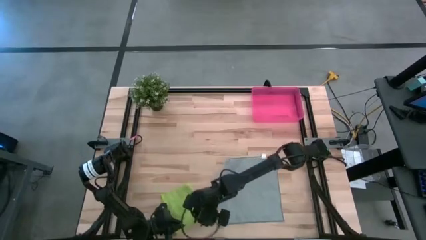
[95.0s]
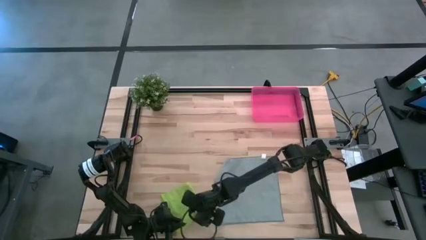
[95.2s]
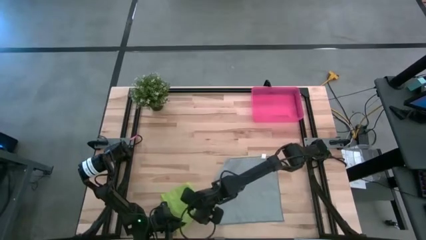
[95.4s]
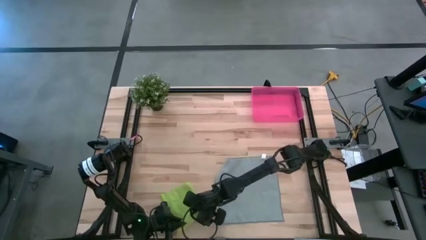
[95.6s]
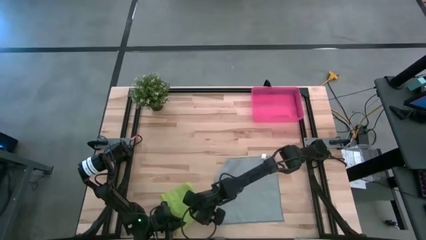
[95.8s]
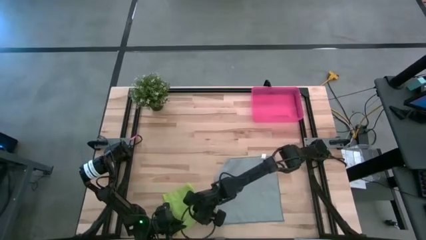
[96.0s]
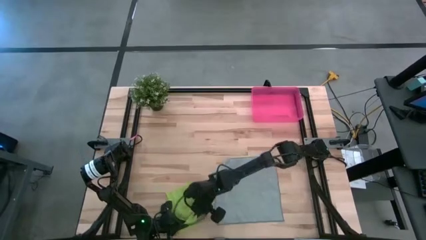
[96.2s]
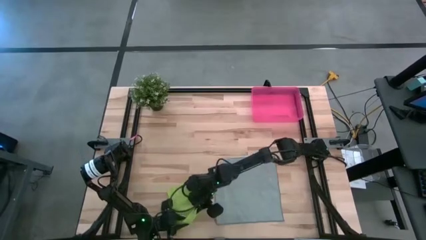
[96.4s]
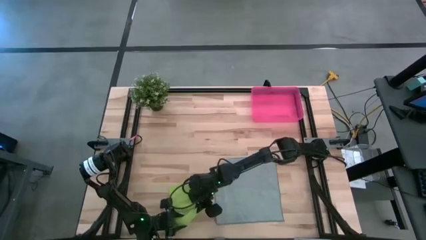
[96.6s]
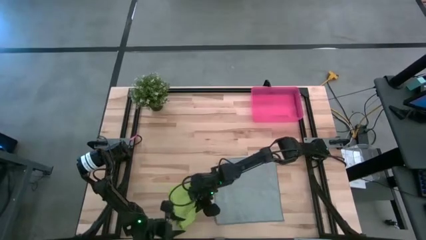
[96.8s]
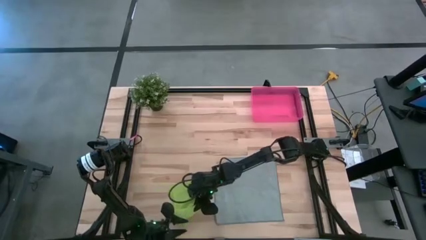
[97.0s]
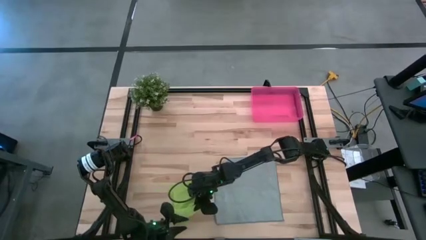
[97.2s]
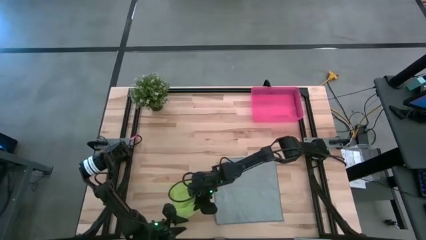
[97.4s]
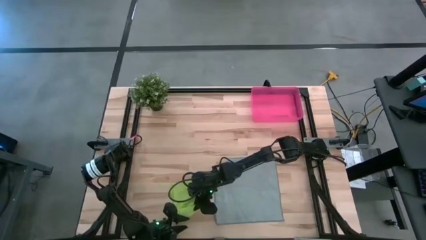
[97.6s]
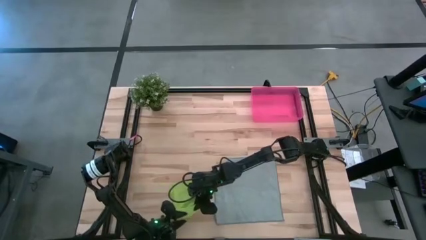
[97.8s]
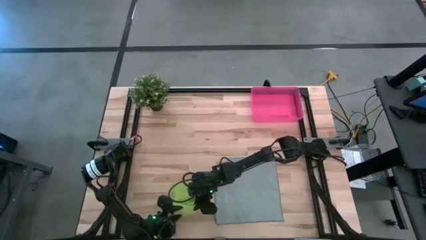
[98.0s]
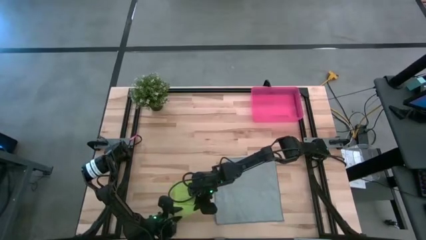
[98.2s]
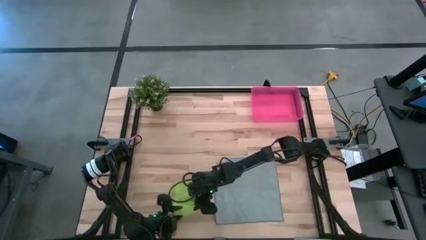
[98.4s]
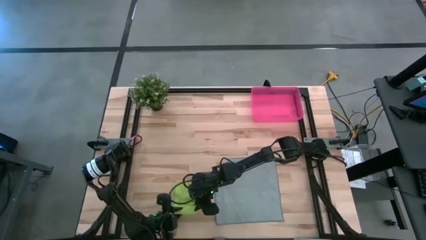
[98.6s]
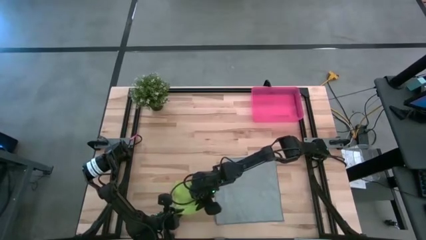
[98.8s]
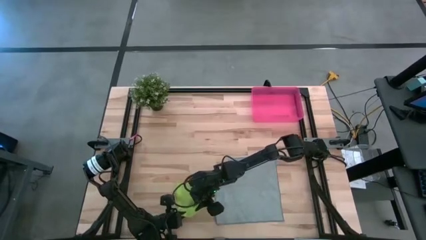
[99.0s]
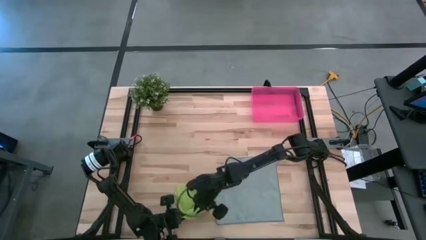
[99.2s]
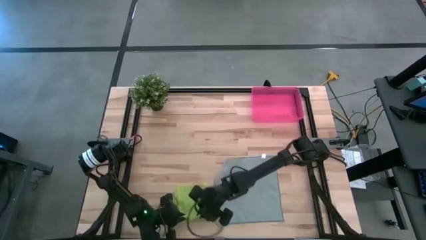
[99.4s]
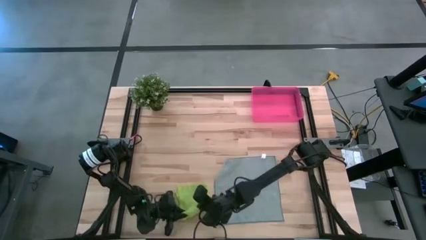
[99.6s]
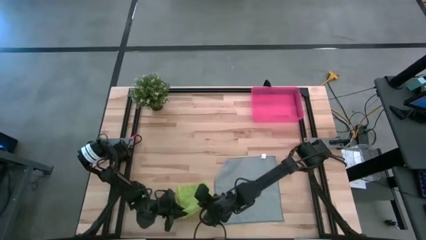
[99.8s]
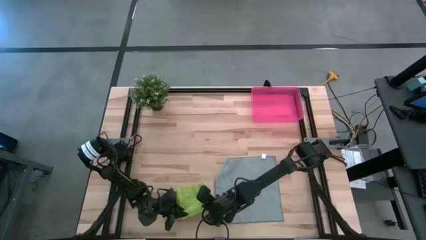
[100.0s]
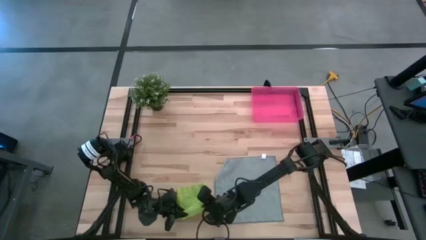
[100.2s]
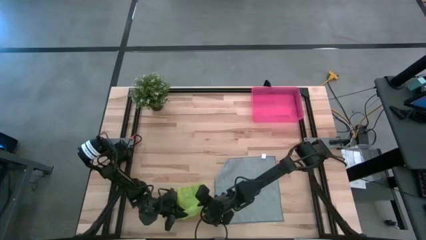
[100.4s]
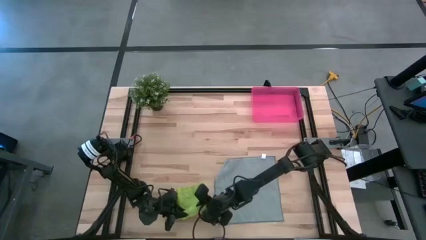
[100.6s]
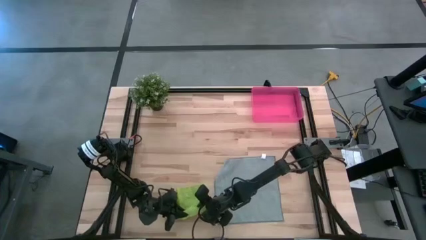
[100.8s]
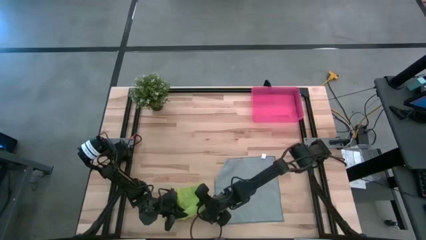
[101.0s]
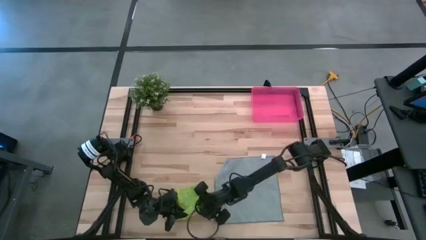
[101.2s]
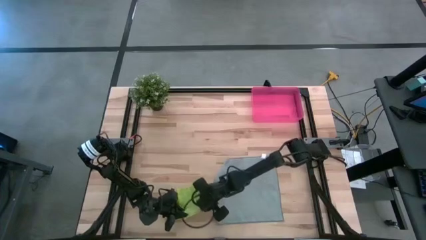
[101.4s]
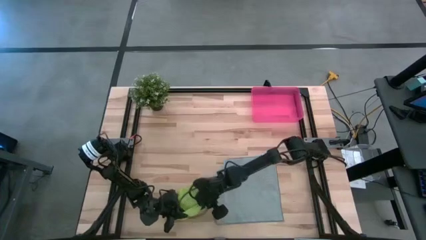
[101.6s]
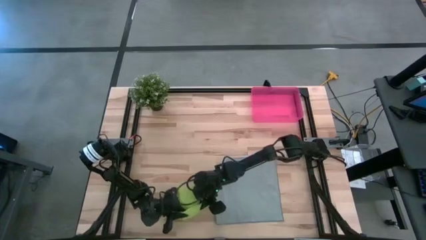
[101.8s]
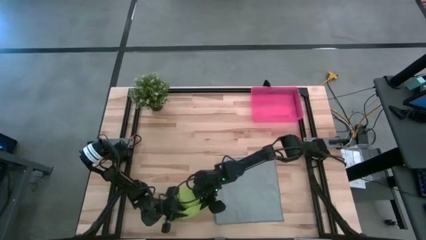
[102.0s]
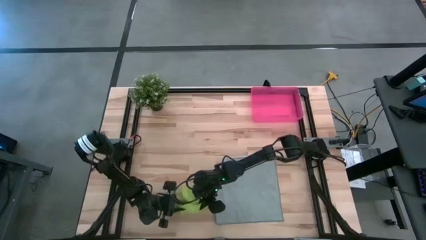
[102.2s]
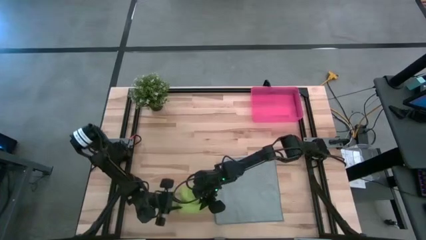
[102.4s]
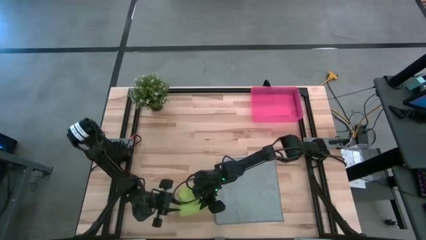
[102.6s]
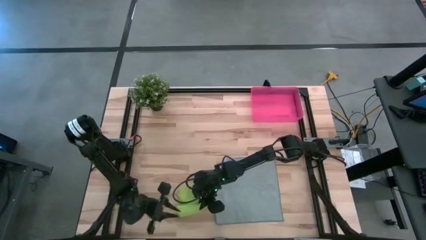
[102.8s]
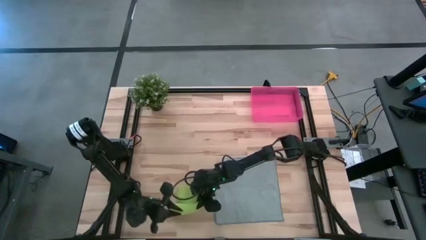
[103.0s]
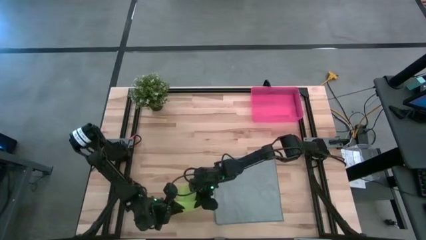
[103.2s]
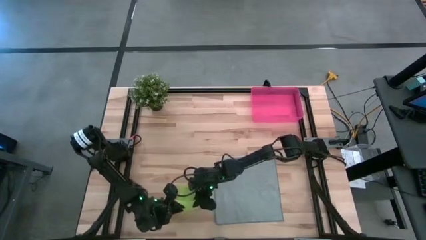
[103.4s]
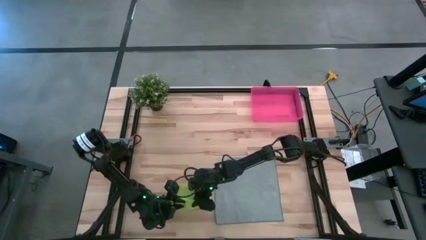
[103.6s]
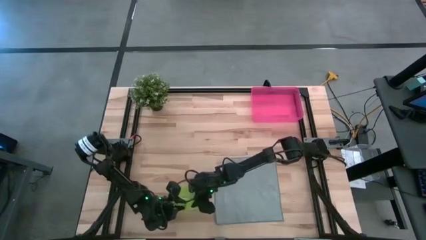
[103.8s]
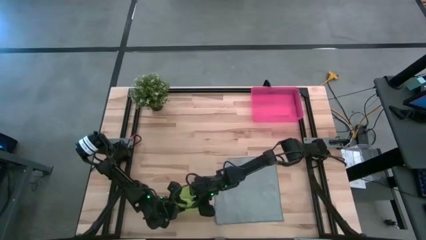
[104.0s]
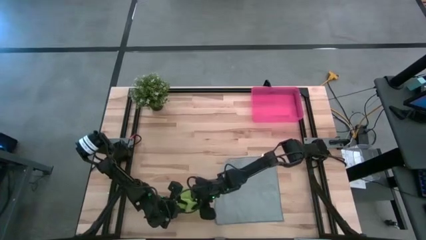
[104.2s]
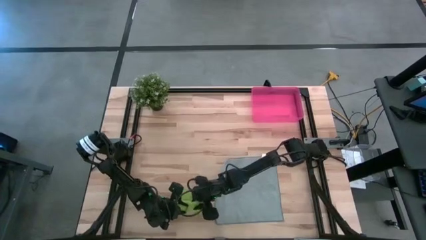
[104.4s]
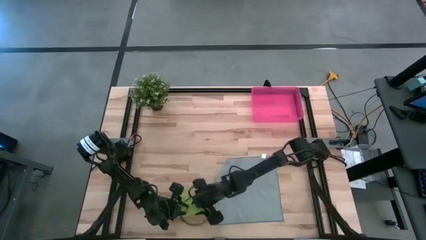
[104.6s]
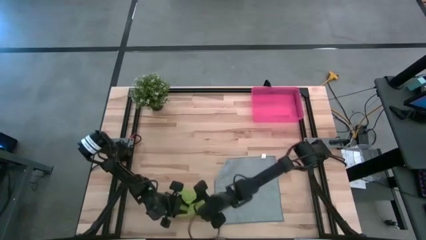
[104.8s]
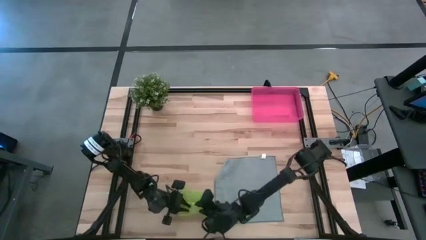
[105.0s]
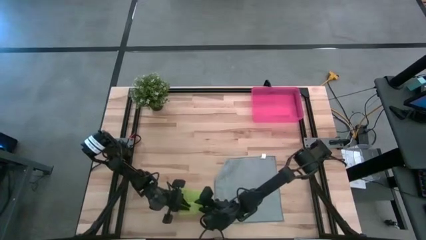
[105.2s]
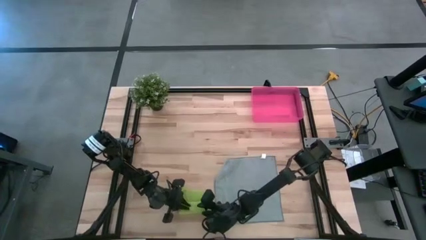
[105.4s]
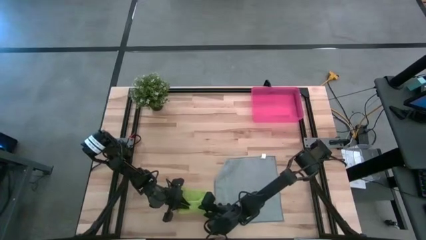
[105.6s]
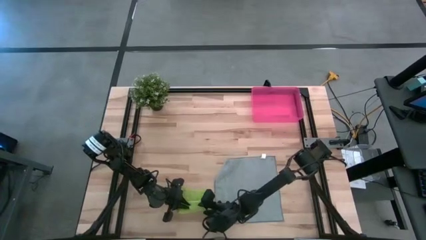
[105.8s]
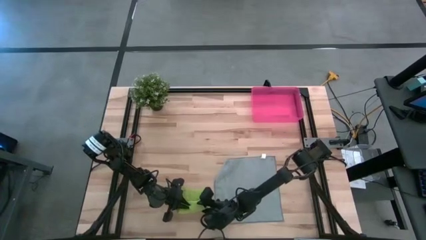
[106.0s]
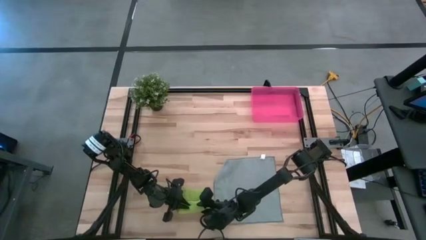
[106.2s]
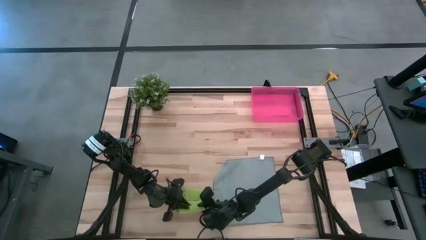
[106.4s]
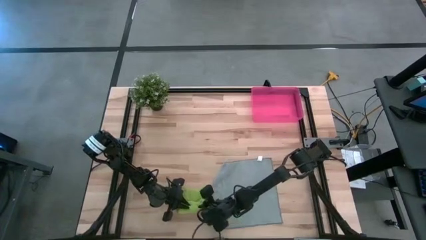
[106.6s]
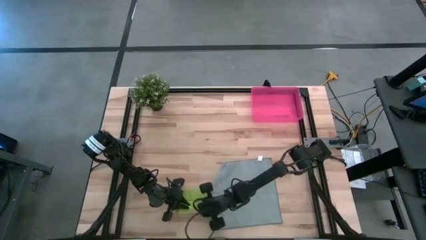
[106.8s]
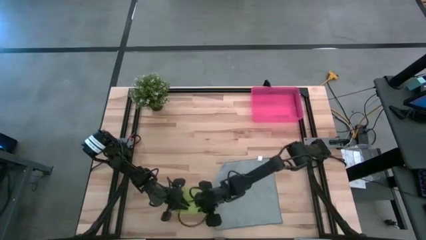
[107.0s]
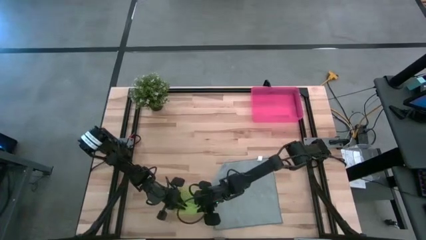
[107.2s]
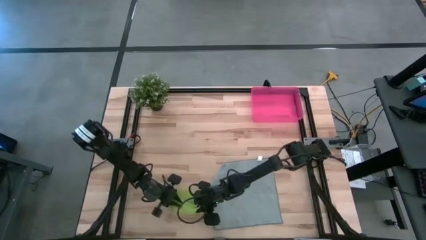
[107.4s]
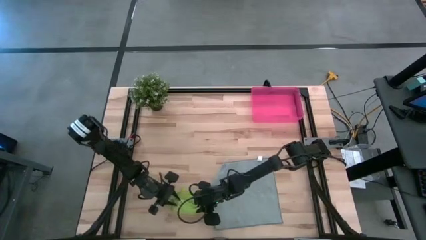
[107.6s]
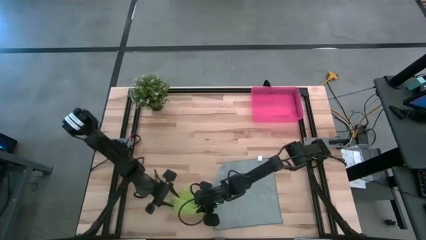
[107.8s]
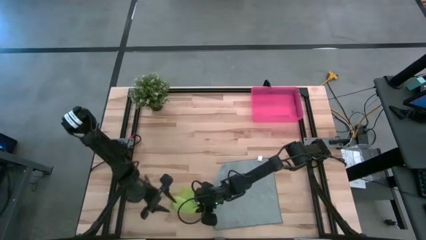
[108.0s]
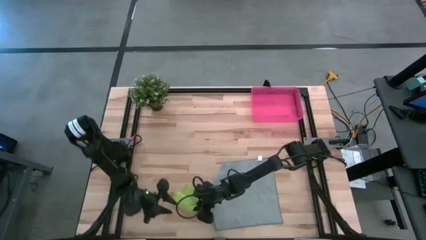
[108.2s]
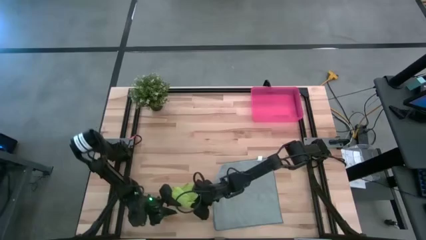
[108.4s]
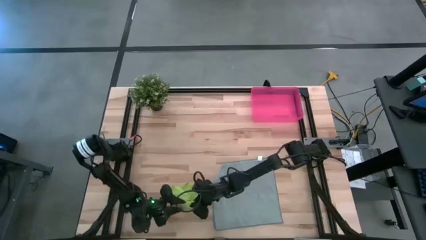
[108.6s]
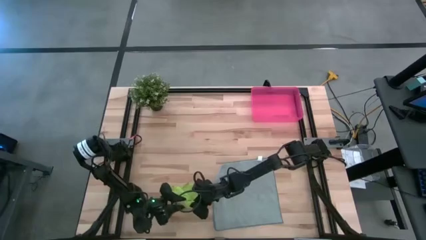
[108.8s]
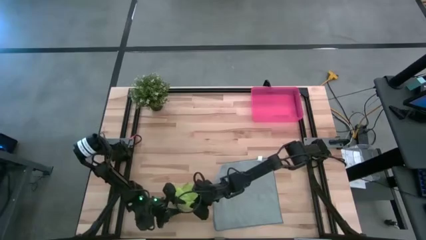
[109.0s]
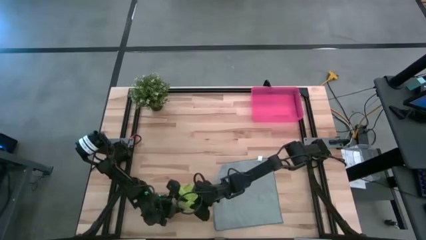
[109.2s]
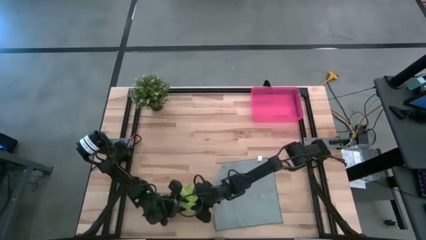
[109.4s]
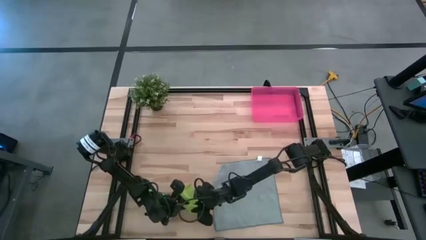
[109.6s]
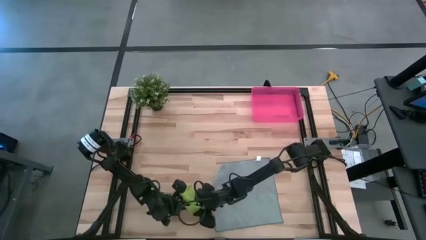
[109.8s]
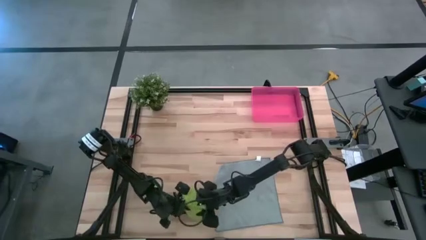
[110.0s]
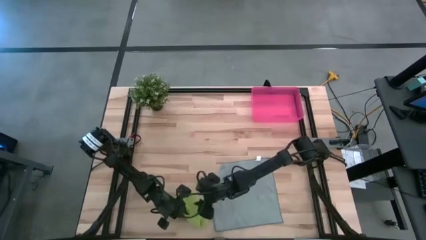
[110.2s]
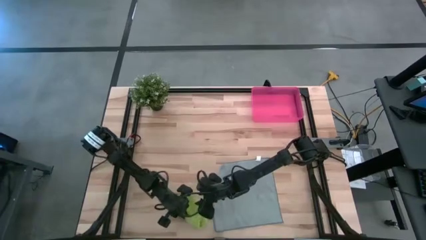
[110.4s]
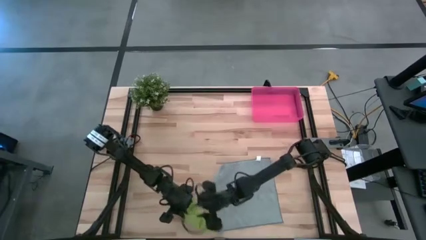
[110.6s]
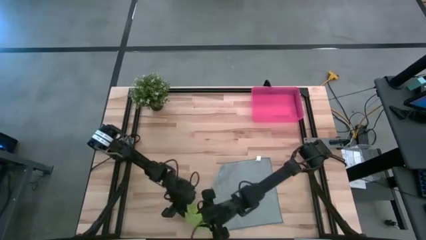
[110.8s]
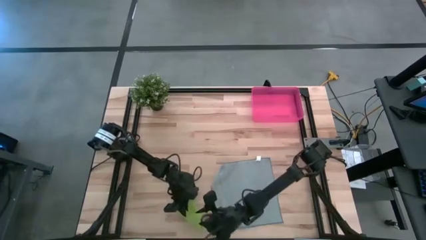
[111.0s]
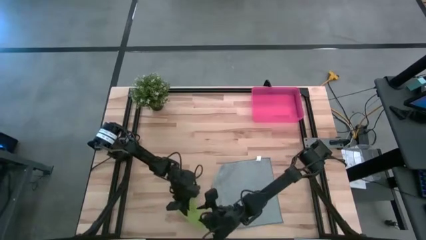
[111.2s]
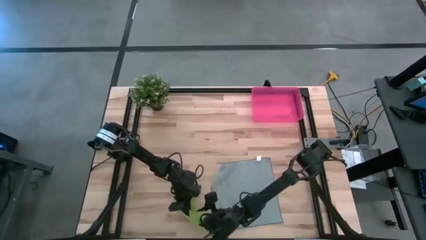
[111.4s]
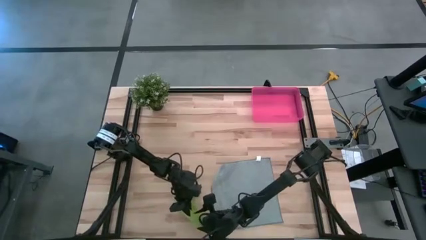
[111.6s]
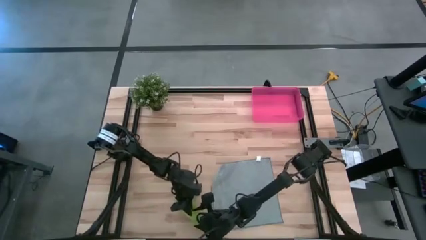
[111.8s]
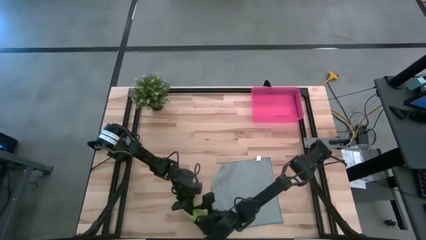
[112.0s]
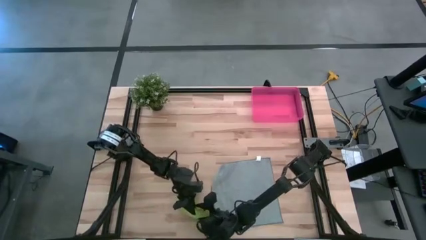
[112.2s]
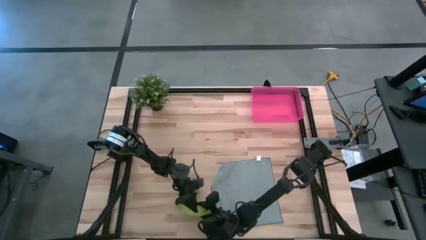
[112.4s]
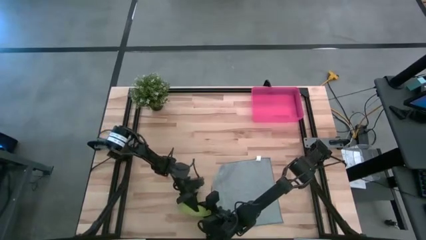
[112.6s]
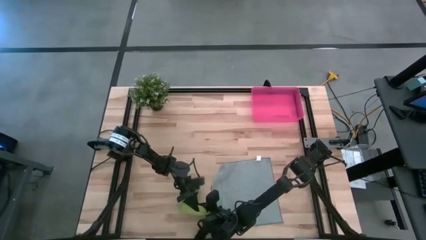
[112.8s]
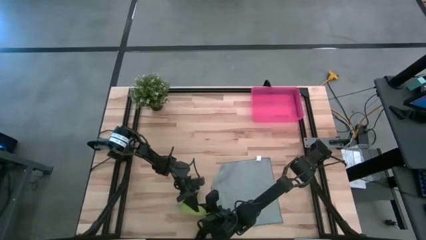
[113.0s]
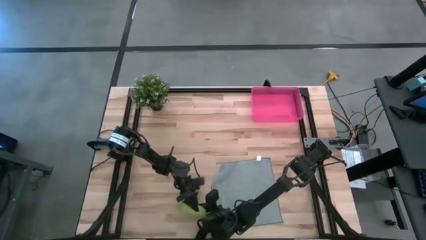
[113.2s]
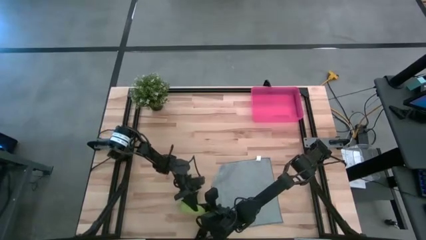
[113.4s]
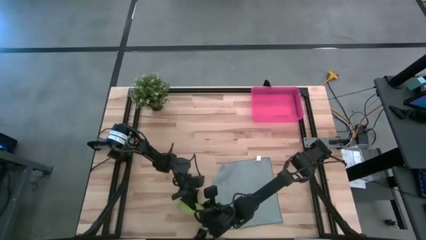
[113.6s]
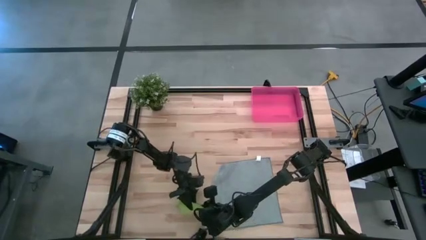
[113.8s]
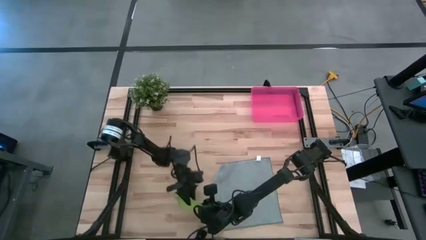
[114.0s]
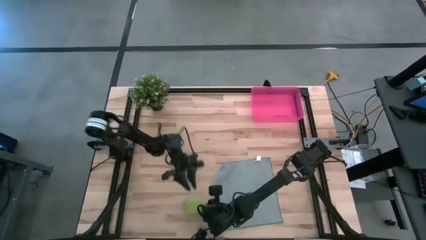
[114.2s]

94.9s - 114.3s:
Task: Roll microfiber towels into tight, uniform cylinder then place into a basket
Roll the green microfiber cloth
